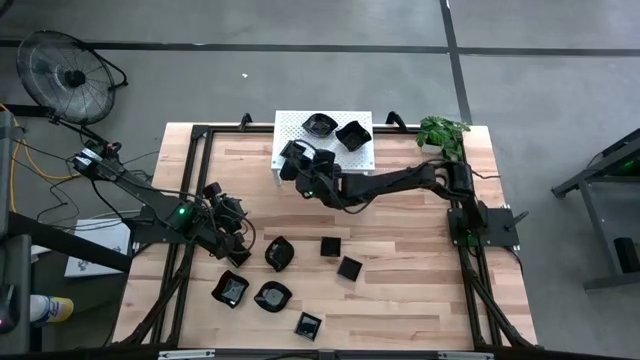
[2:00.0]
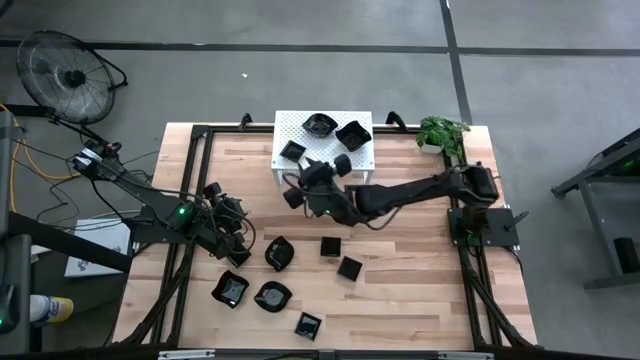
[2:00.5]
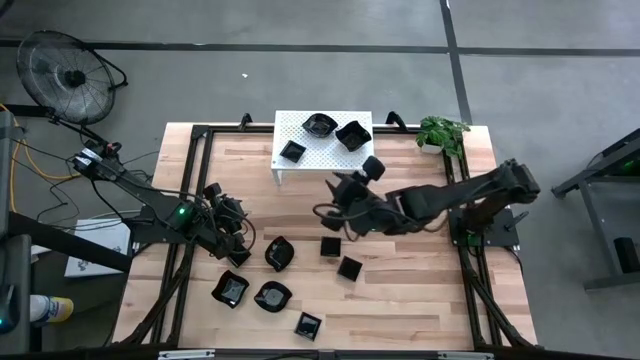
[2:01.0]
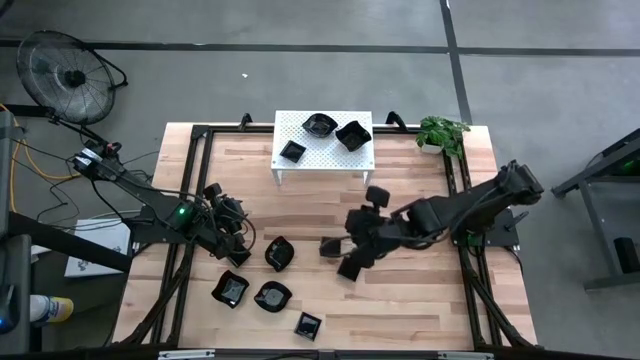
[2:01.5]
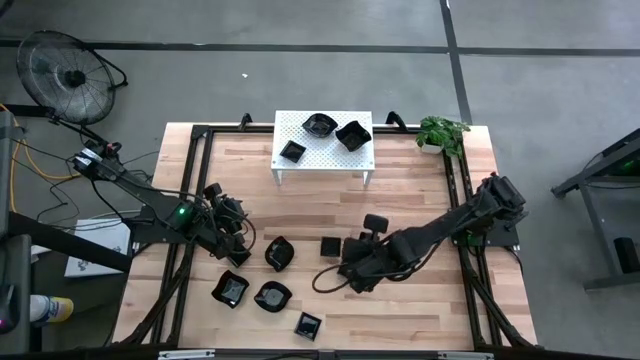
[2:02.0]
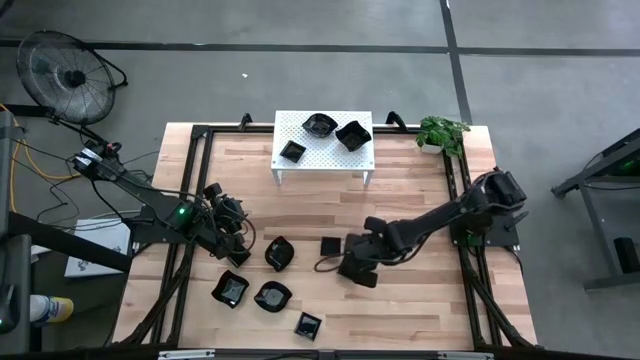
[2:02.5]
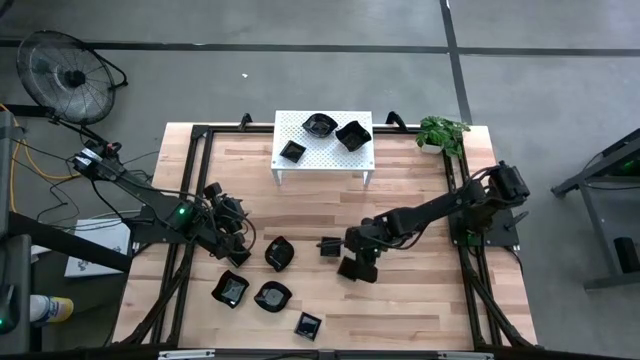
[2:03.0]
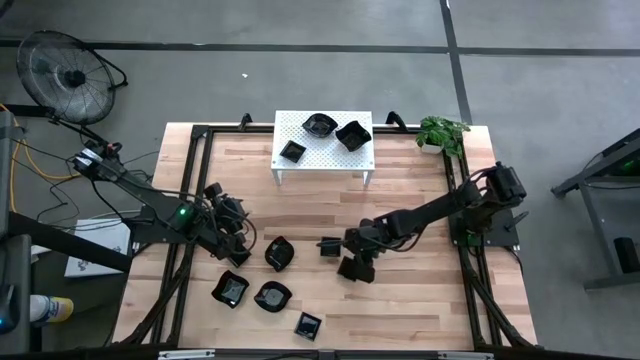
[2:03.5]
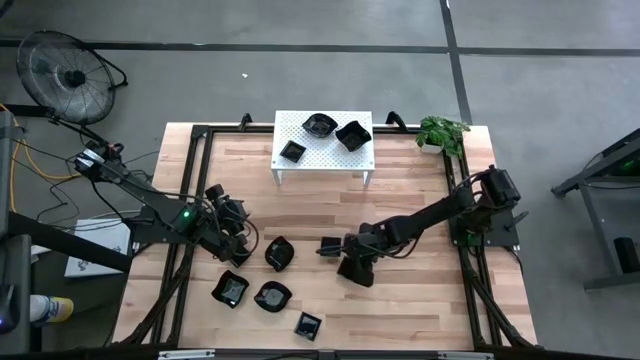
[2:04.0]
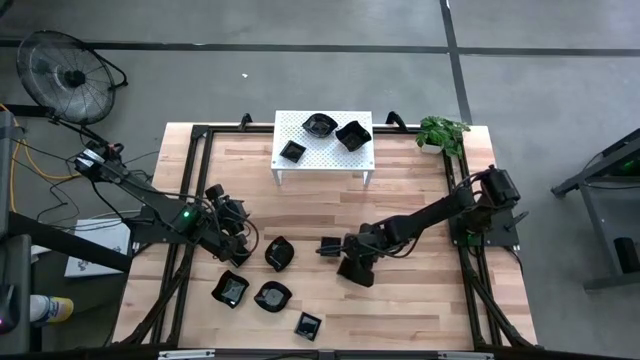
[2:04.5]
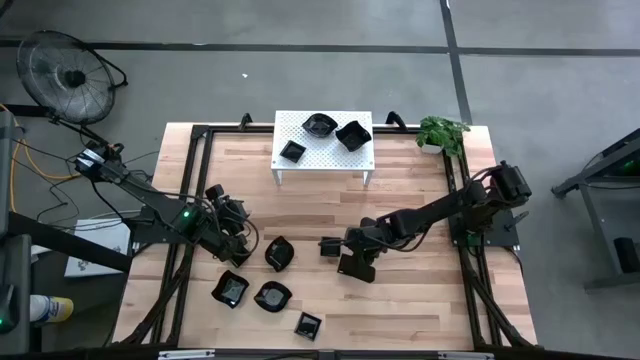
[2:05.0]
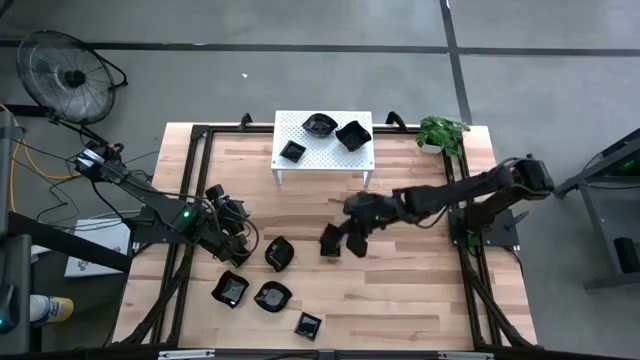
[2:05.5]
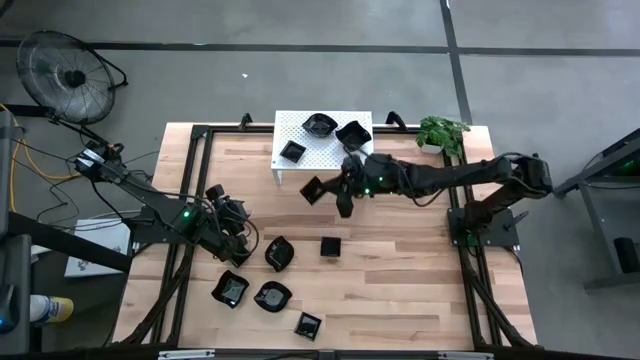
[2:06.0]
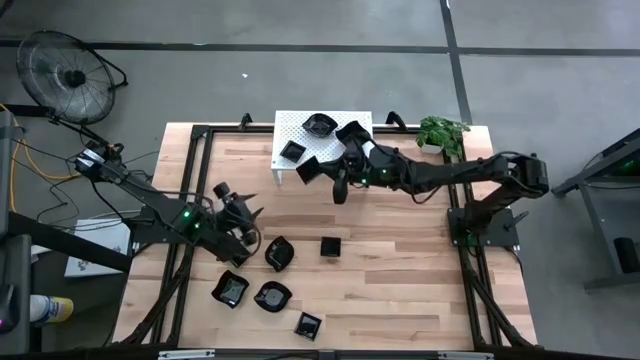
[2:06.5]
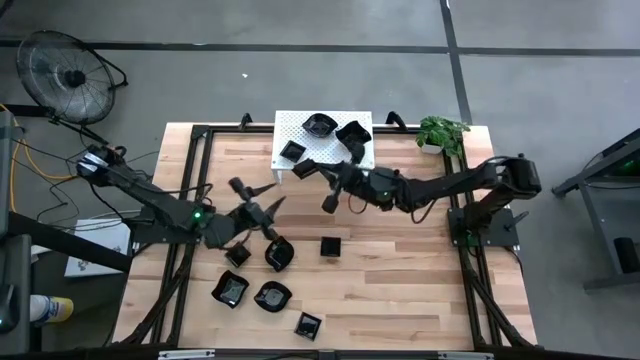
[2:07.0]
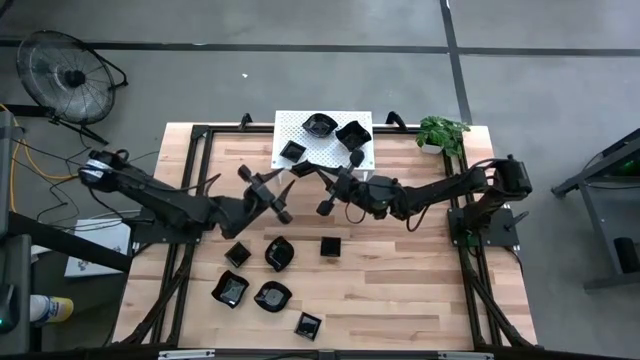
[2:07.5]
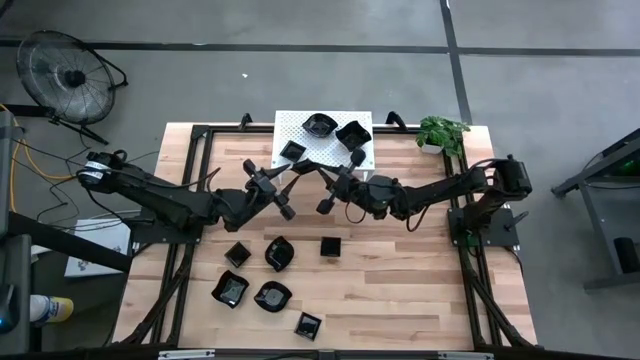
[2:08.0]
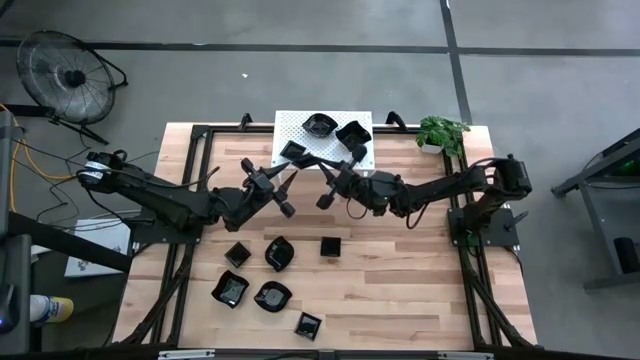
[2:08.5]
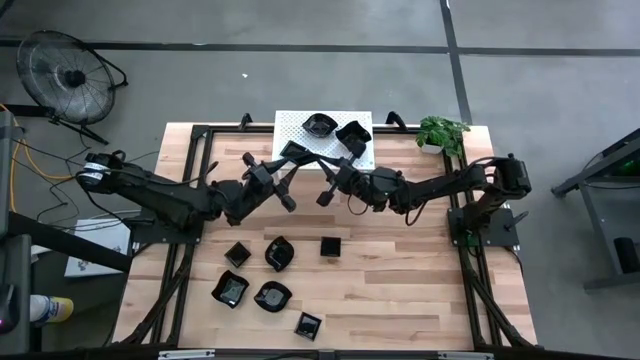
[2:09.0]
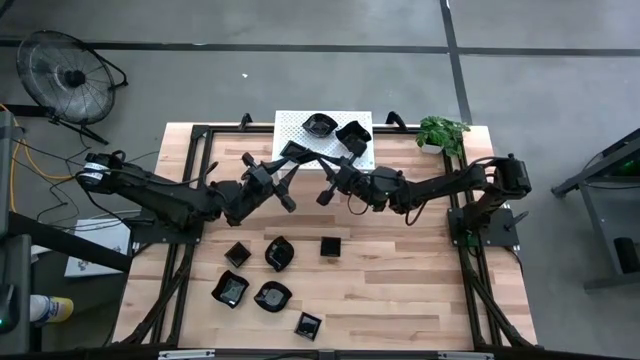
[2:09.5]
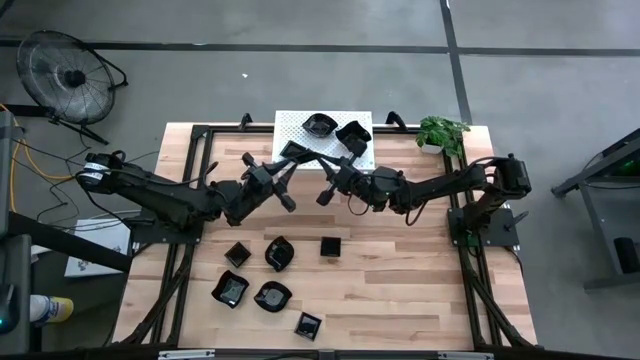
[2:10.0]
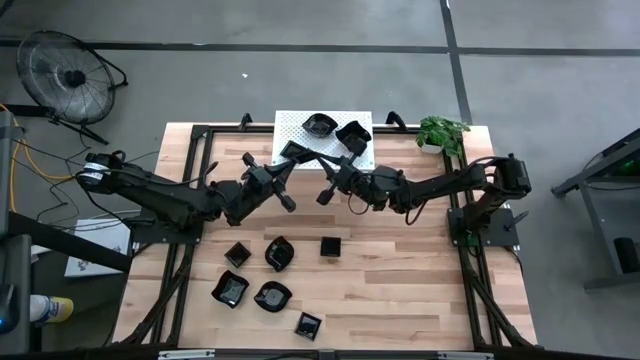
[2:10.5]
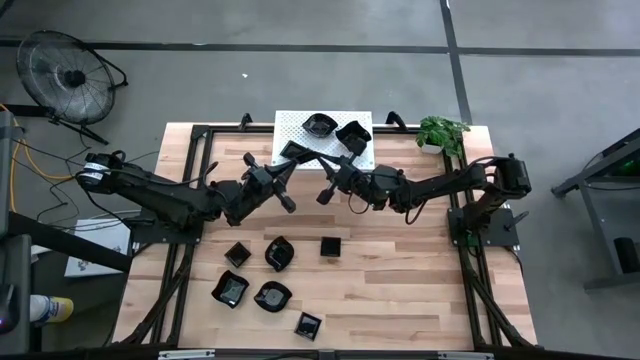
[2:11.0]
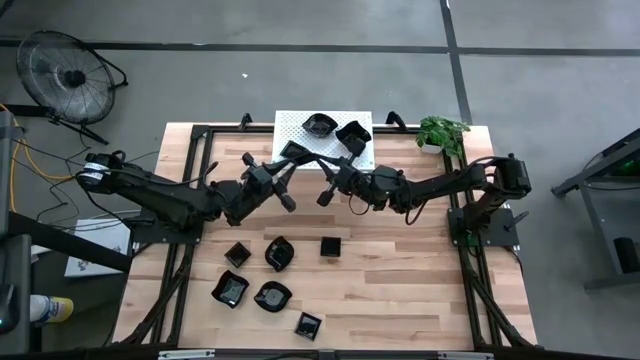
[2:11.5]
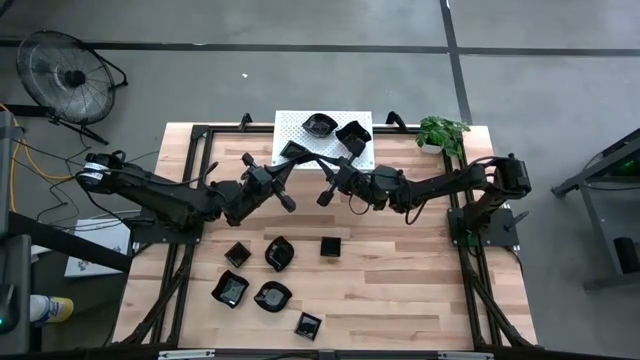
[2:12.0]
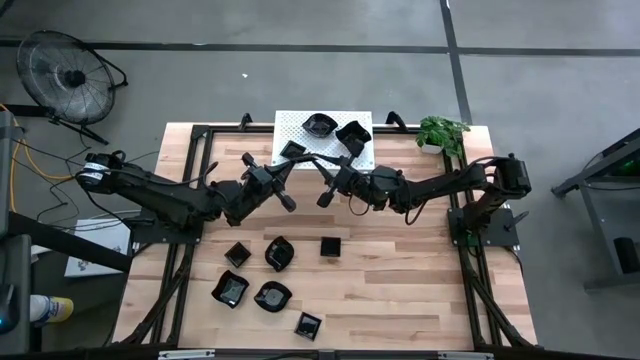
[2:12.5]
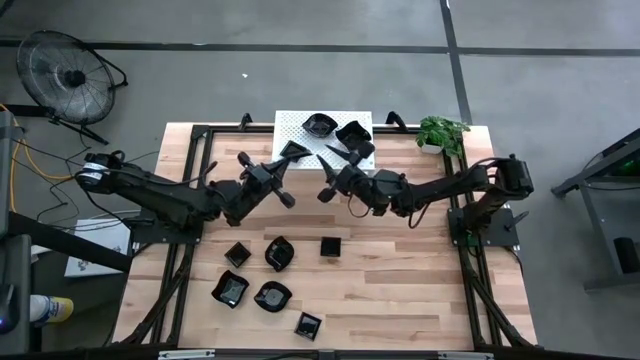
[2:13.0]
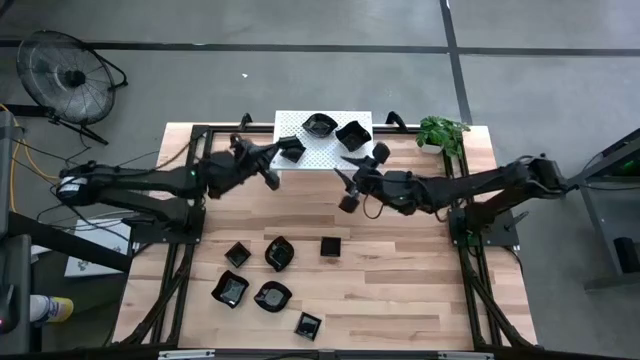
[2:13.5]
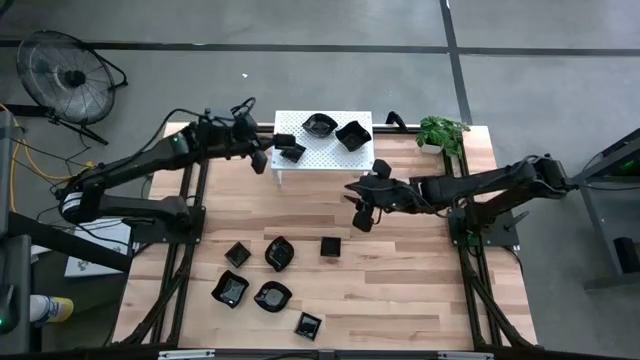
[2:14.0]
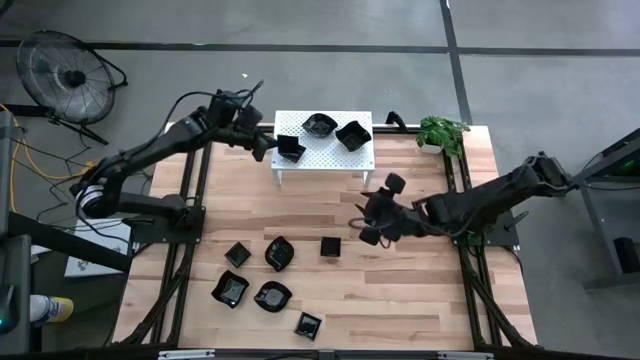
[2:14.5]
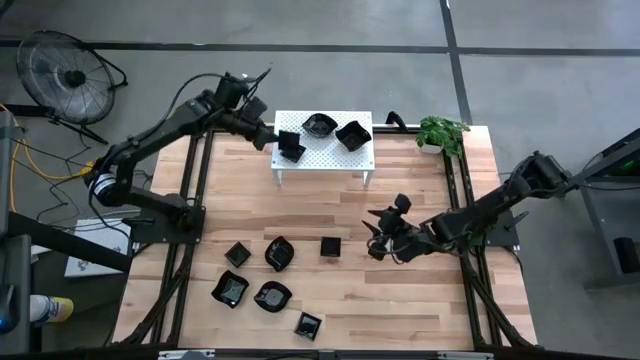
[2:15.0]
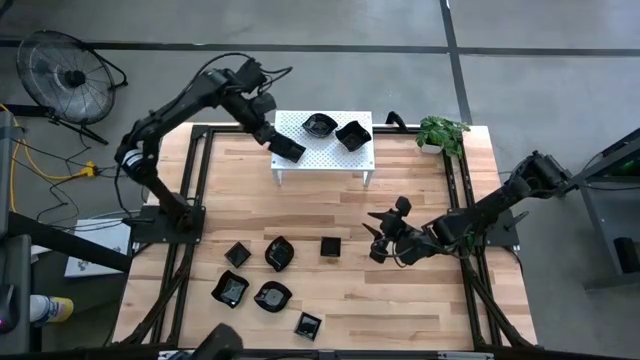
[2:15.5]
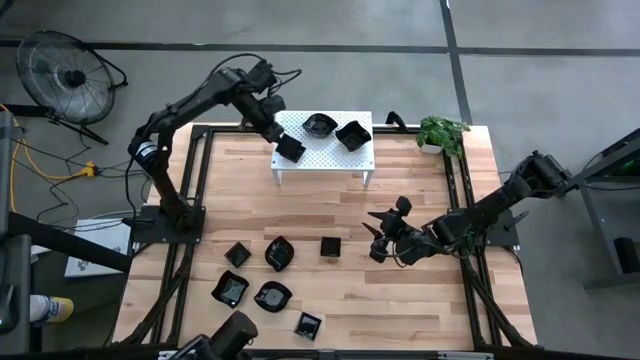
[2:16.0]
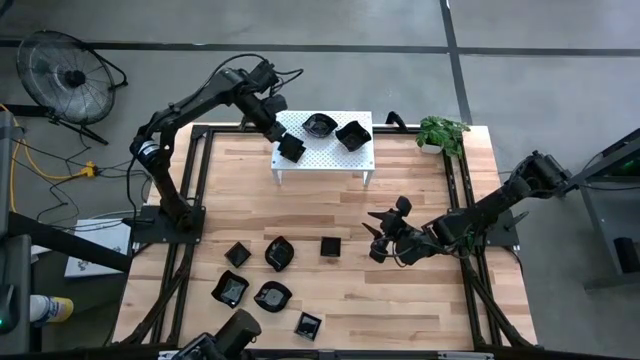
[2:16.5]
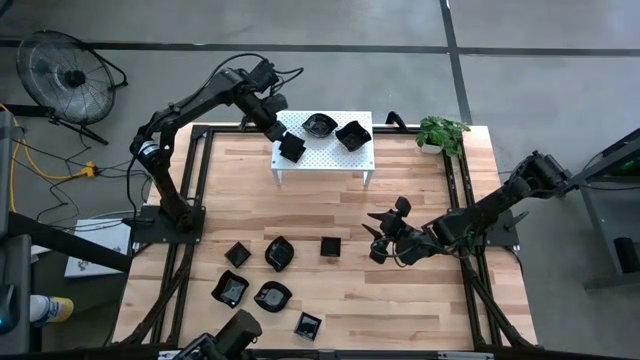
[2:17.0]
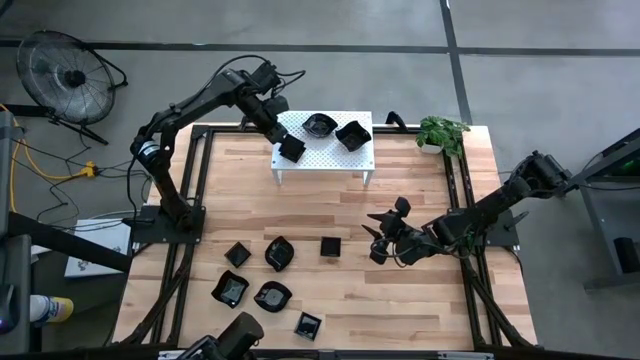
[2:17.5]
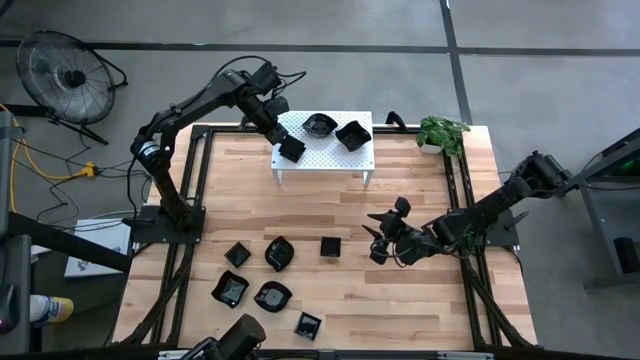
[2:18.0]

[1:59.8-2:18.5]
Task: Pick & Place Mini shaped plates
Stack the black square plate on top of the black square plate on the shelf

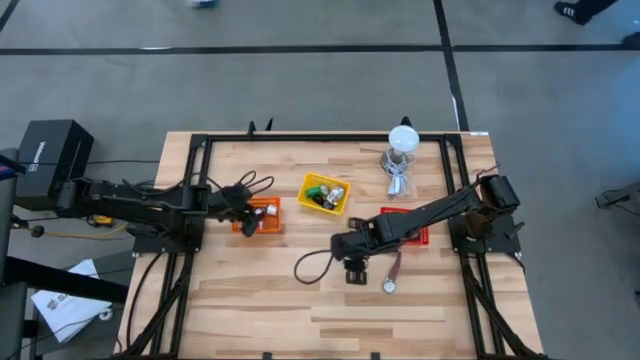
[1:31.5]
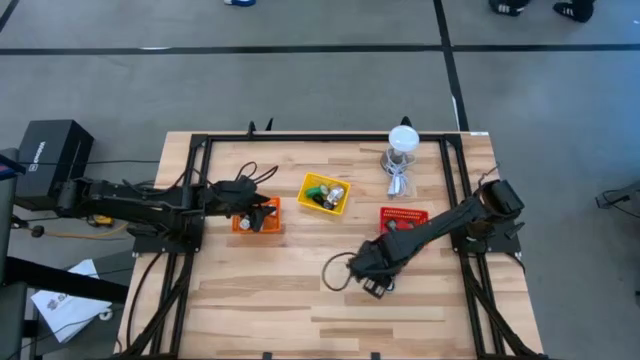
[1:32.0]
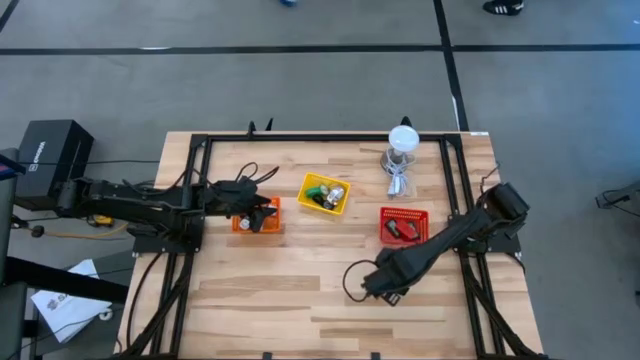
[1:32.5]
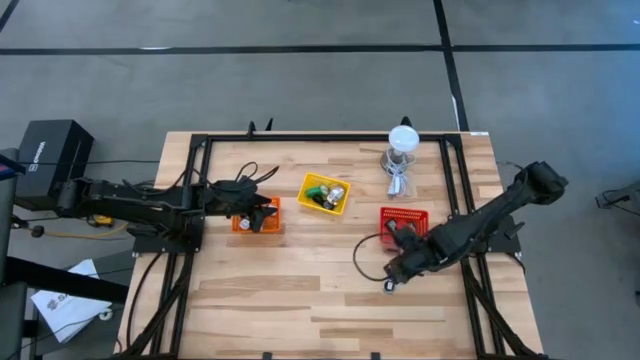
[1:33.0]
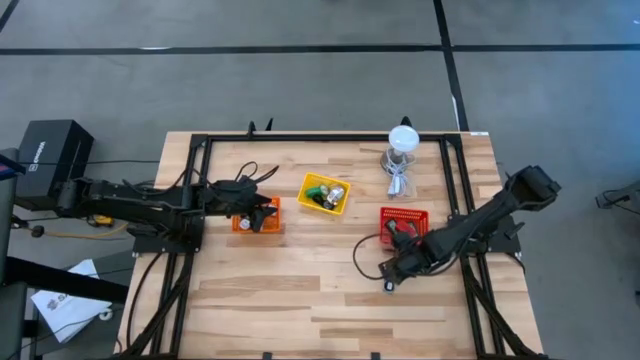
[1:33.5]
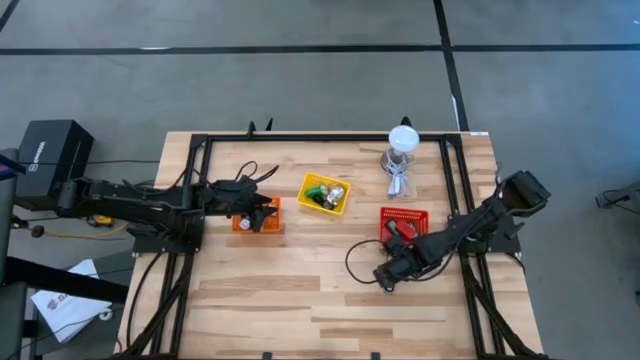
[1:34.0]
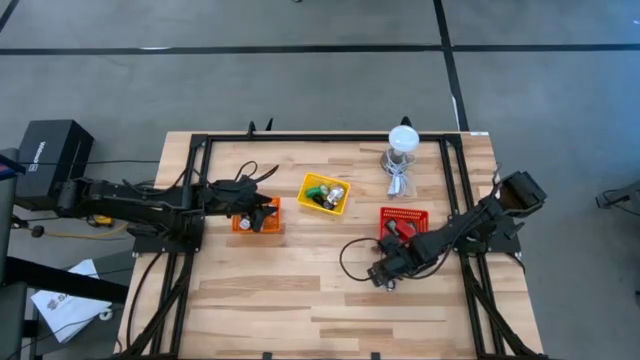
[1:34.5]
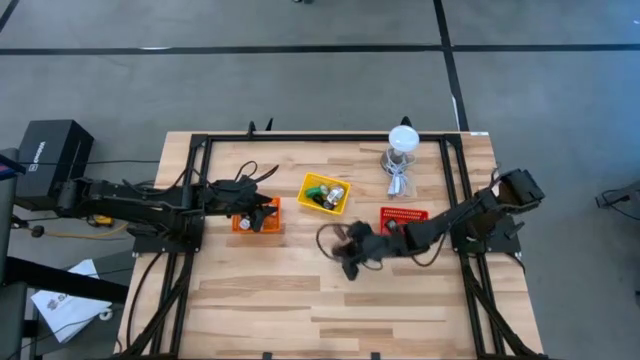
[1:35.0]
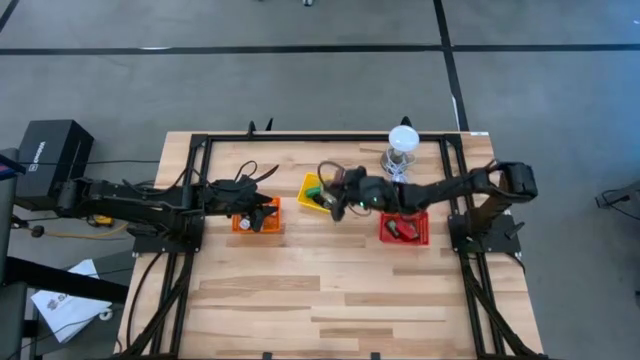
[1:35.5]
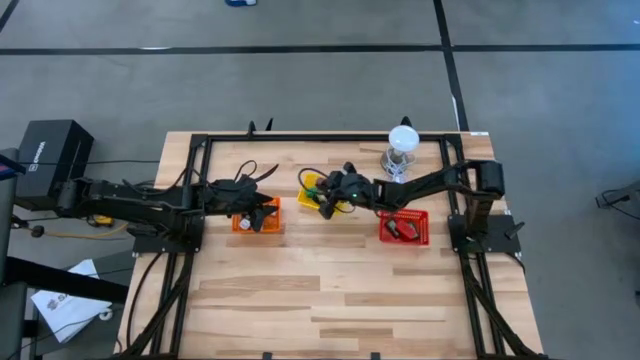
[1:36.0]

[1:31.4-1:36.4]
Task: Pick & Place Office items
Put the brown wristwatch into the yellow bin
